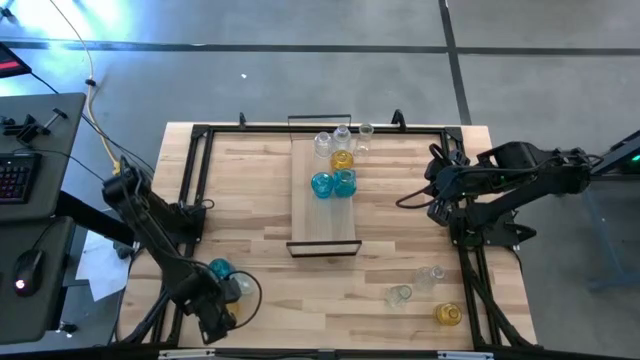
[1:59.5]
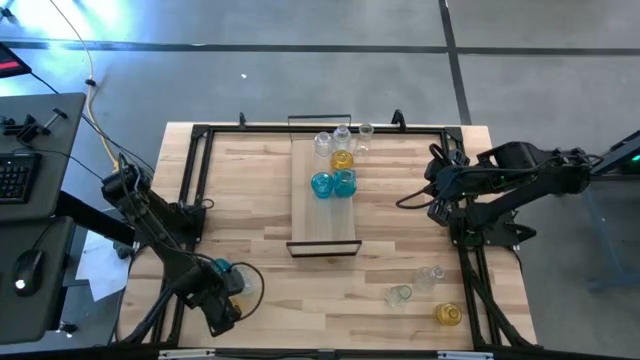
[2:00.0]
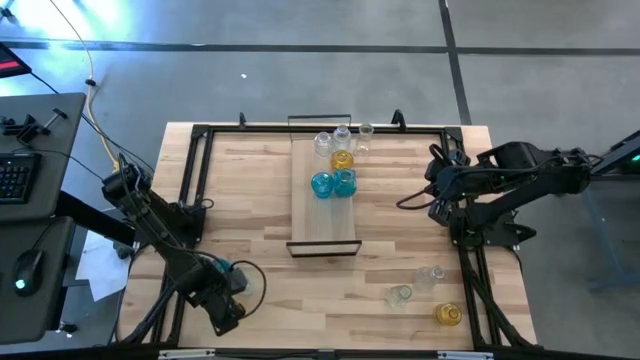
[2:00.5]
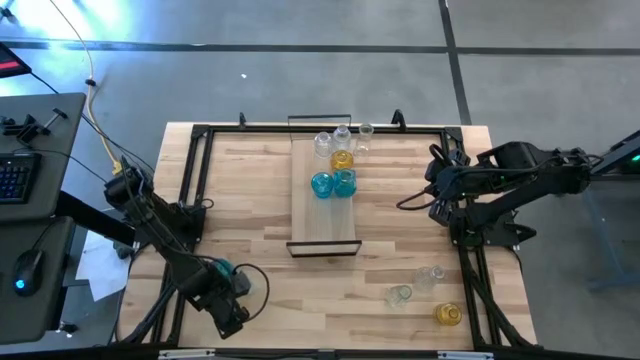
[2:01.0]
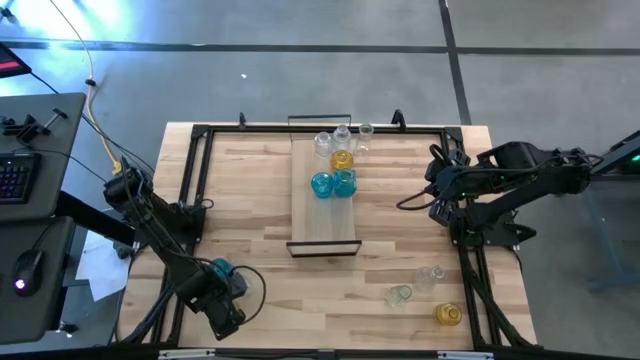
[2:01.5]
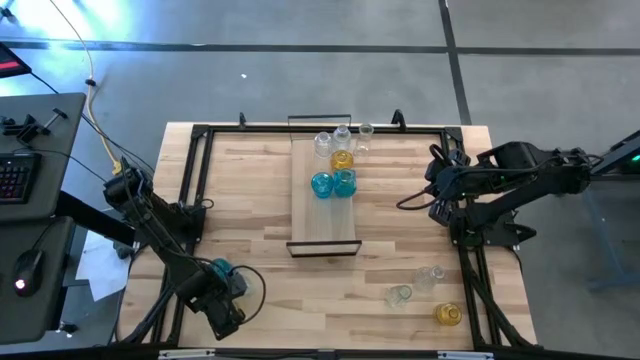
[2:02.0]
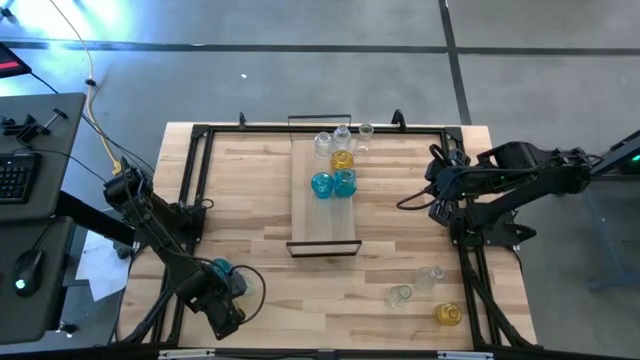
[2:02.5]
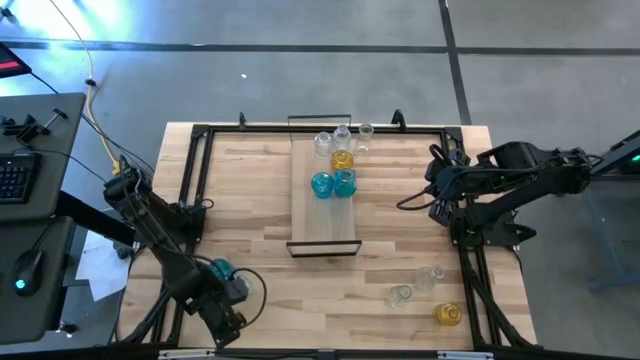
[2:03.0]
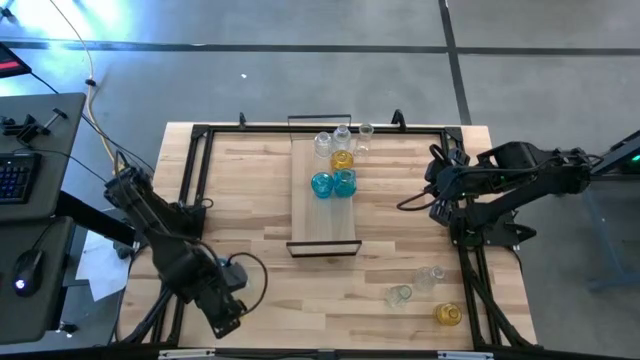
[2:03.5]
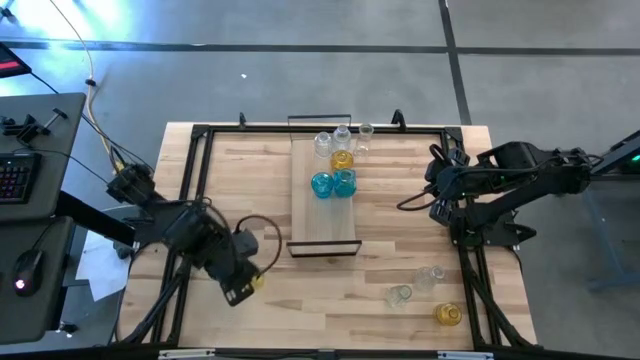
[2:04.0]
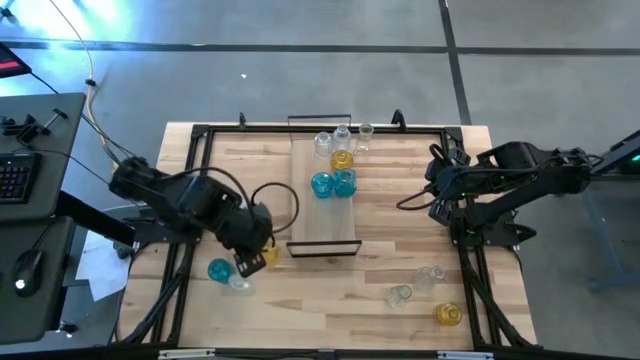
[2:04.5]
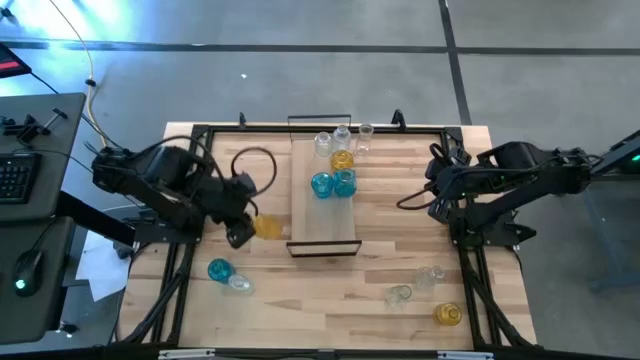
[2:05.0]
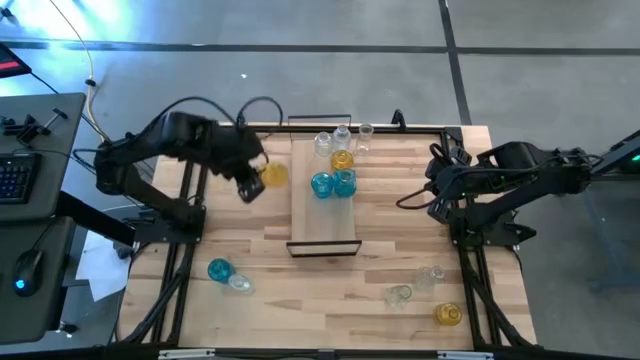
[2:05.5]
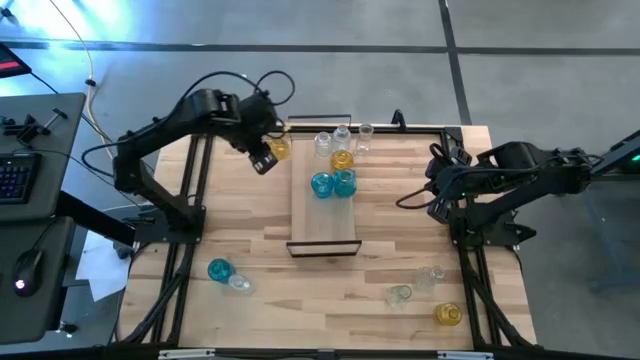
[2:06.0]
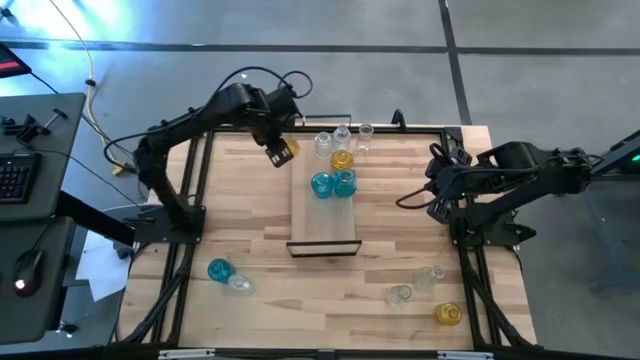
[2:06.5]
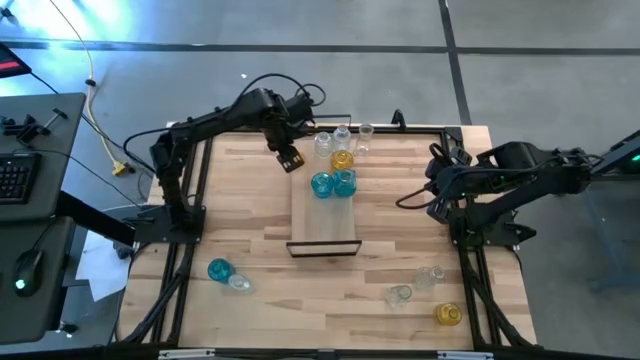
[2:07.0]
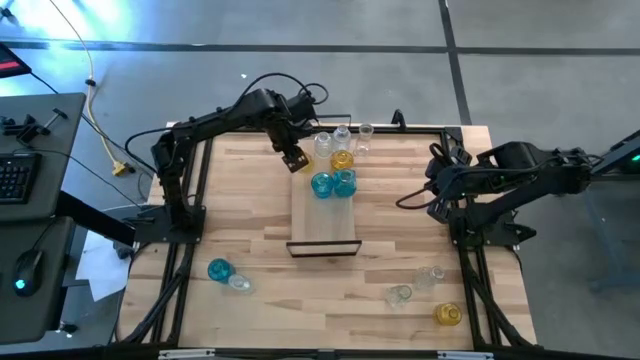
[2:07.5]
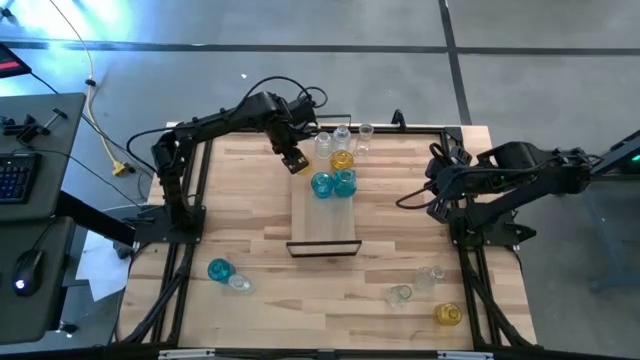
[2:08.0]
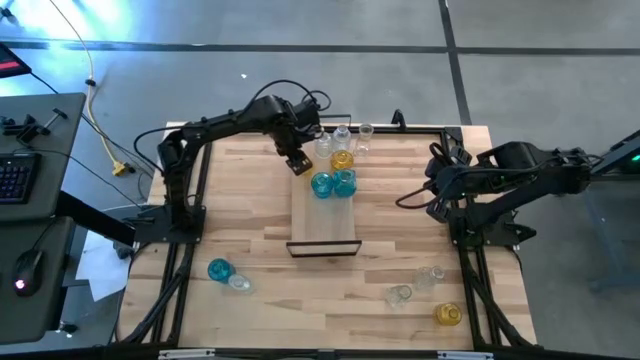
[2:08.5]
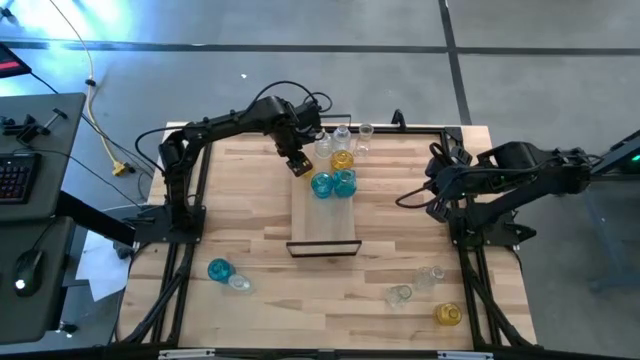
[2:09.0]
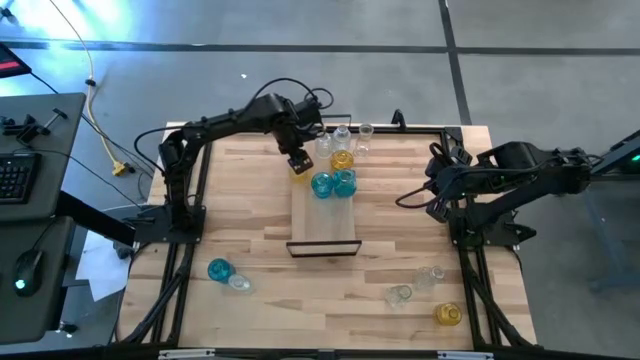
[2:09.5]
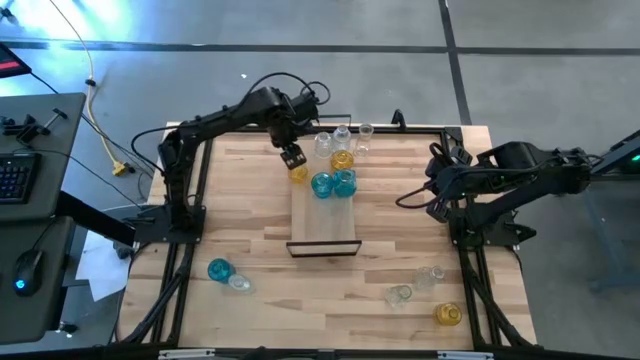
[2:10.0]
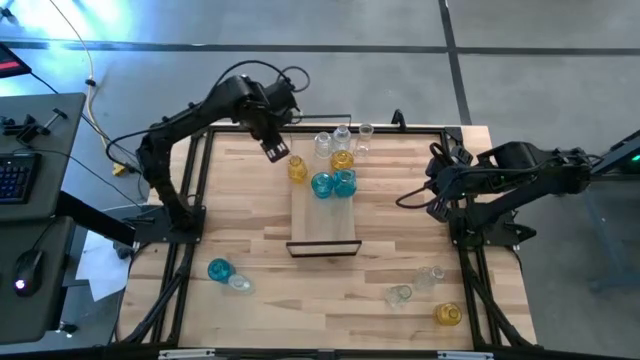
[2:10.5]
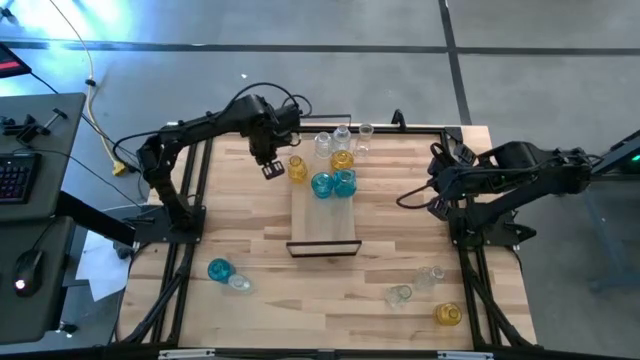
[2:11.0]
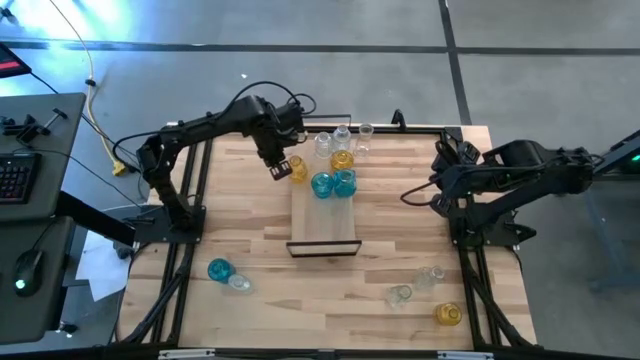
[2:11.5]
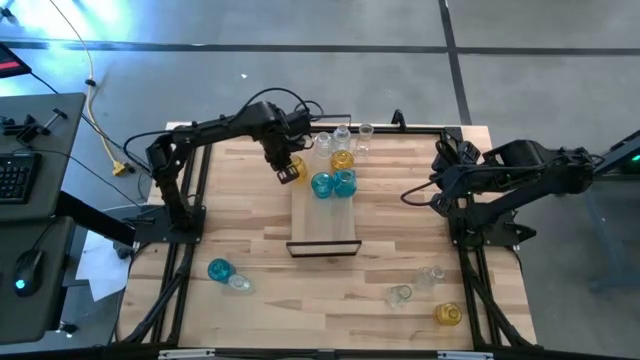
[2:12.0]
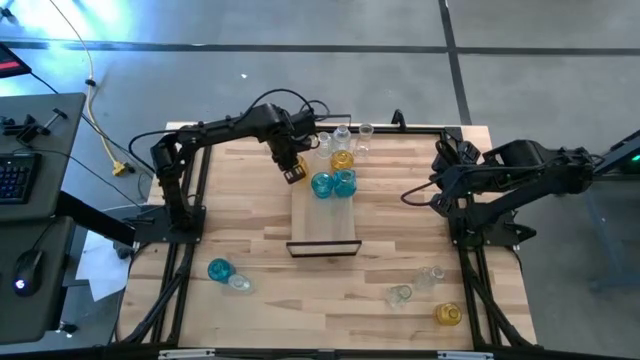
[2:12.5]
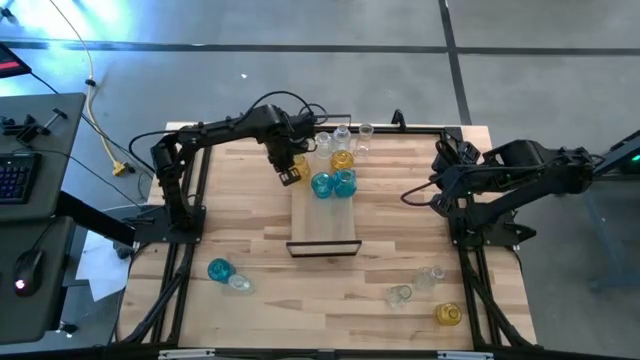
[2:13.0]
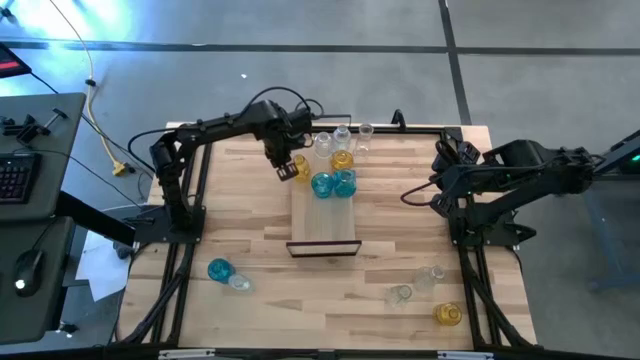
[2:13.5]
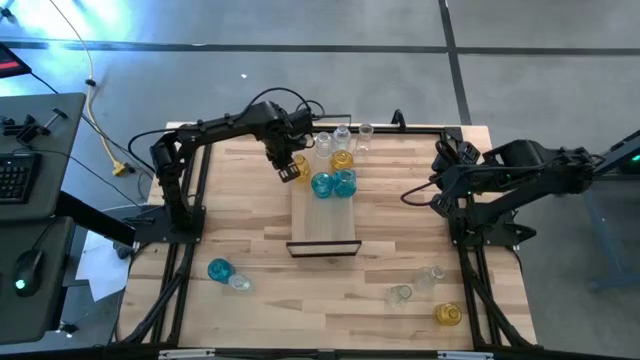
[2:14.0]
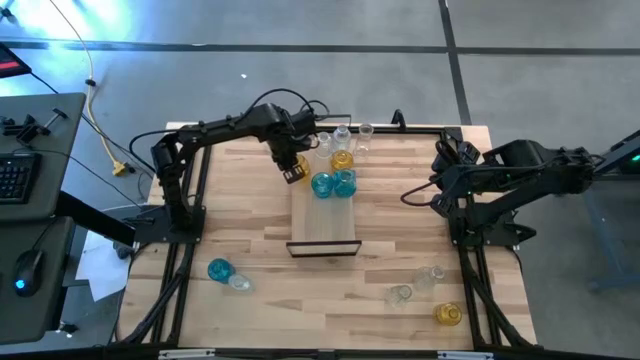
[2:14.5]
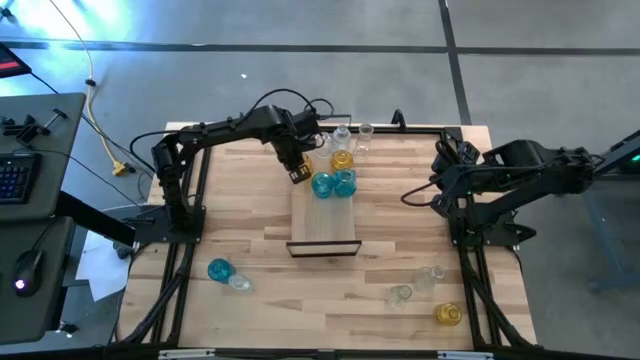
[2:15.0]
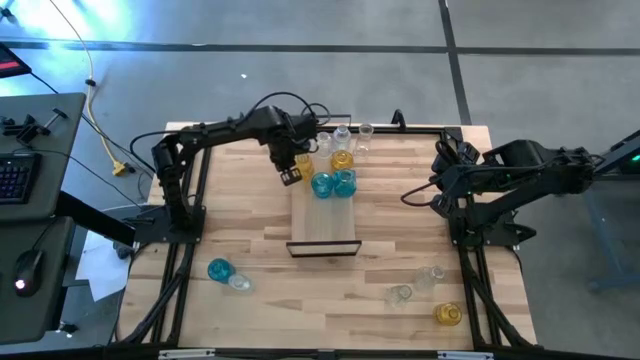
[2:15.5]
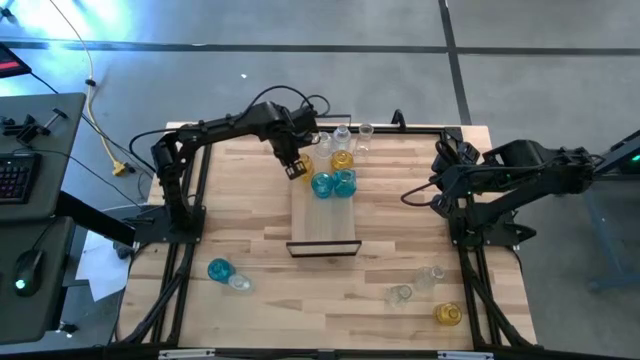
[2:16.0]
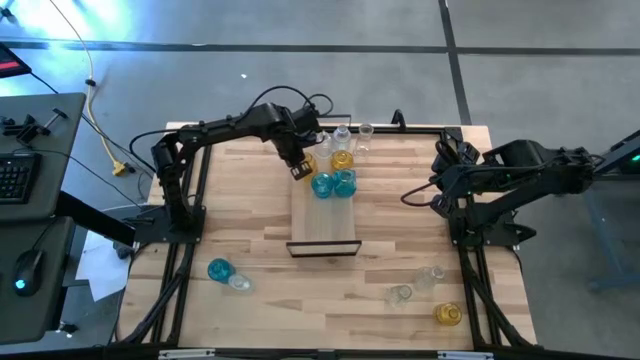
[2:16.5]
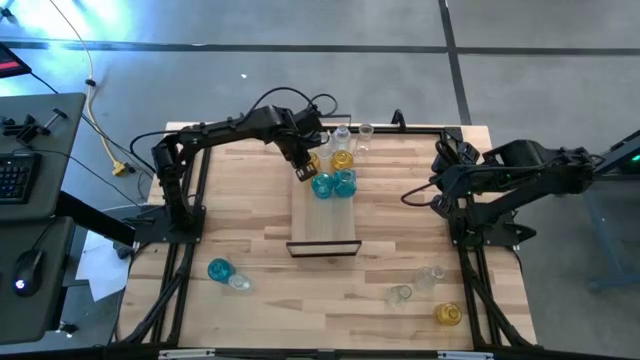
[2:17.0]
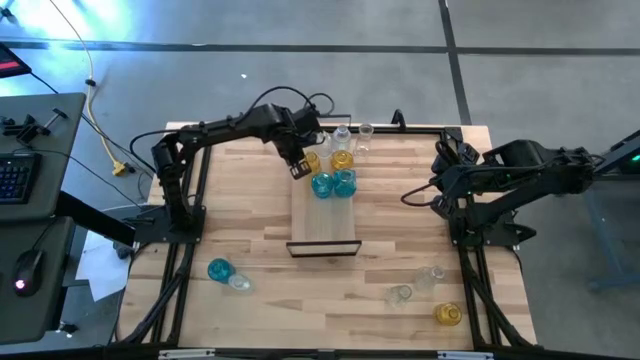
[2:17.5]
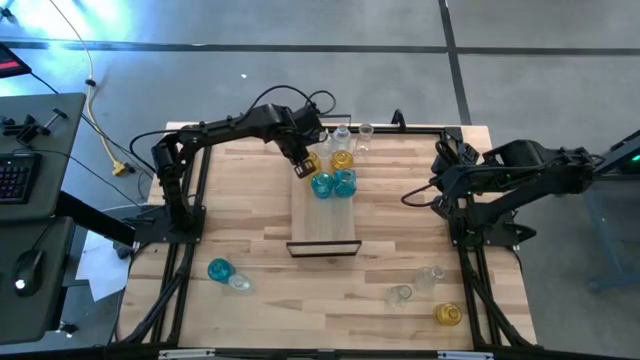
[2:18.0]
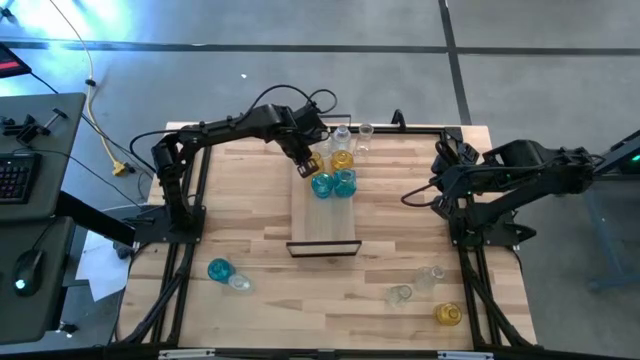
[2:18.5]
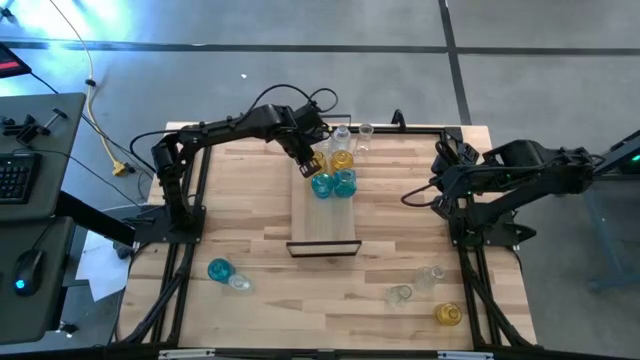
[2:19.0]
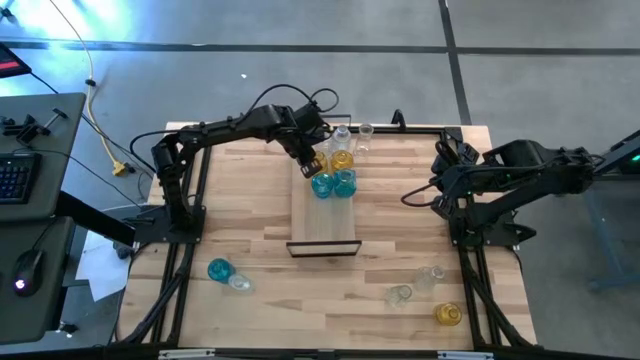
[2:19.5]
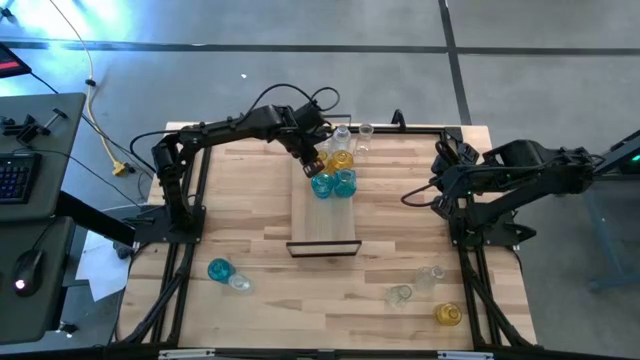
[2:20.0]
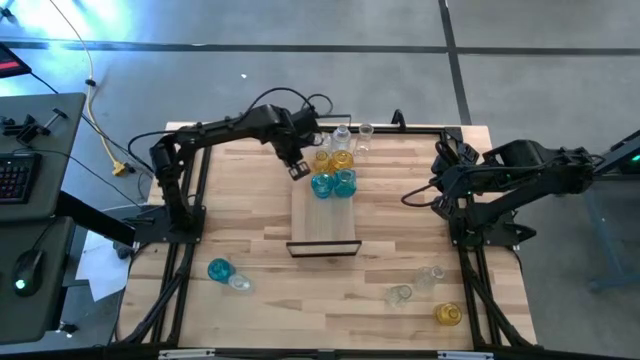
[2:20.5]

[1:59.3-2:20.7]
Task: sort vases onto shelf
Put the bottom left yellow flower vase on the shelf aligned with the other yellow flower vase
